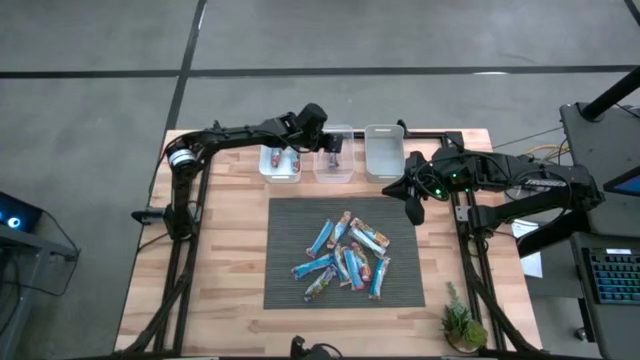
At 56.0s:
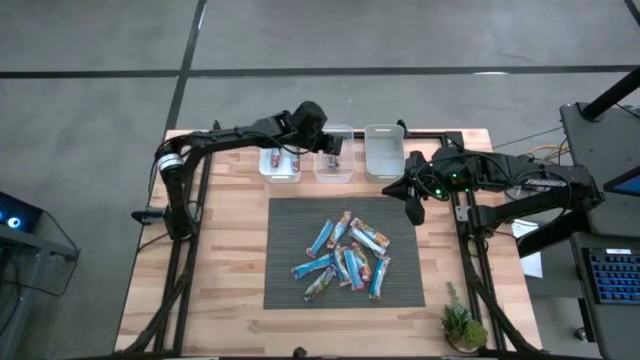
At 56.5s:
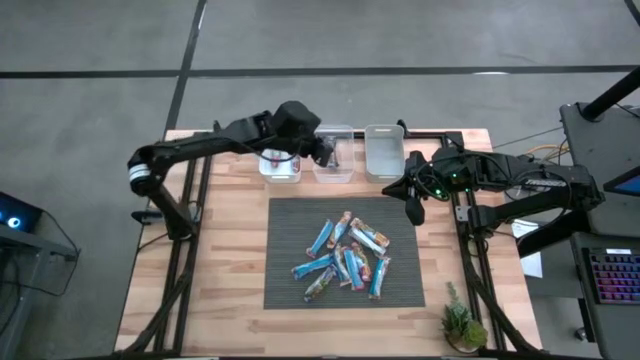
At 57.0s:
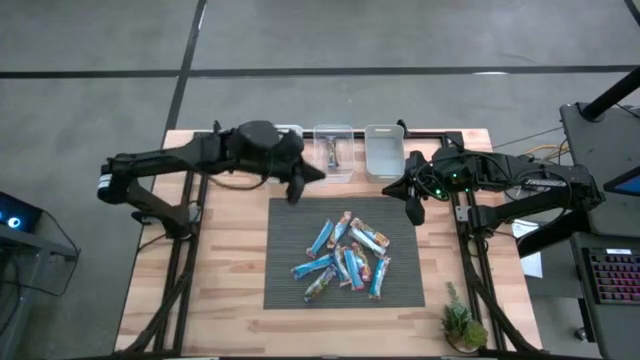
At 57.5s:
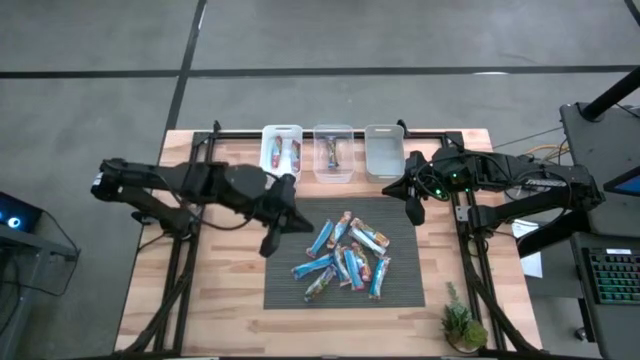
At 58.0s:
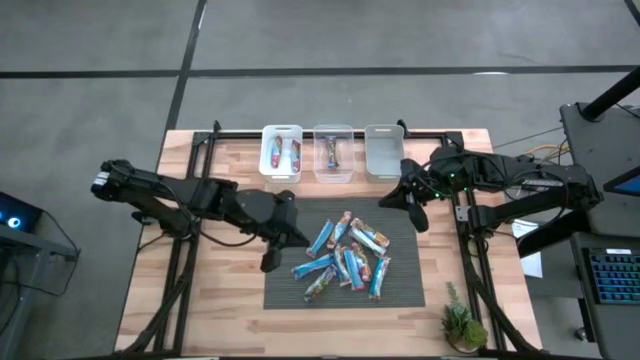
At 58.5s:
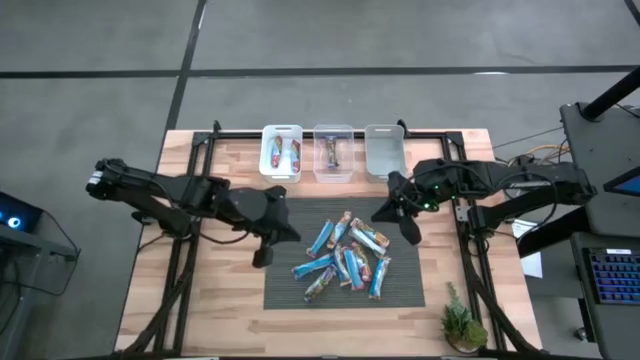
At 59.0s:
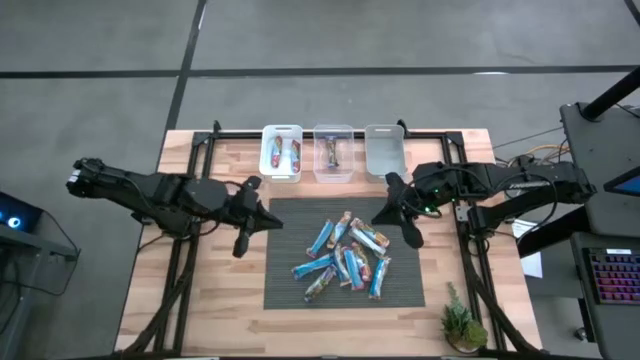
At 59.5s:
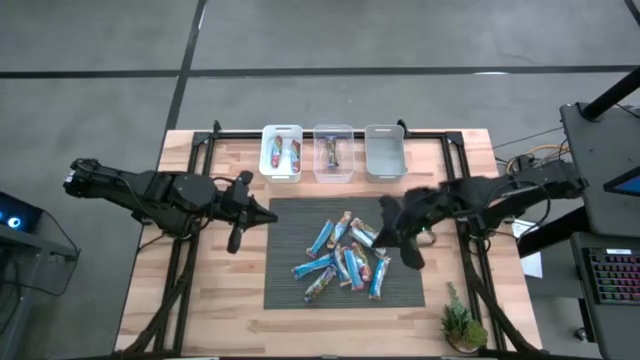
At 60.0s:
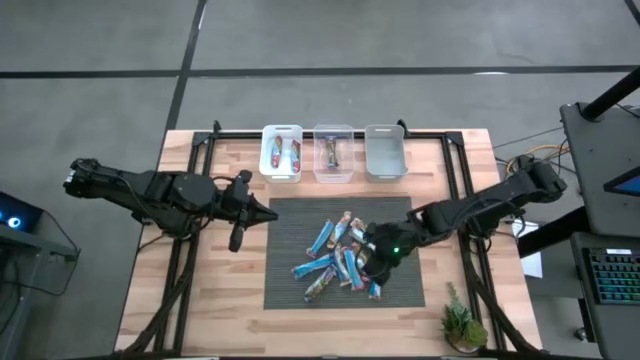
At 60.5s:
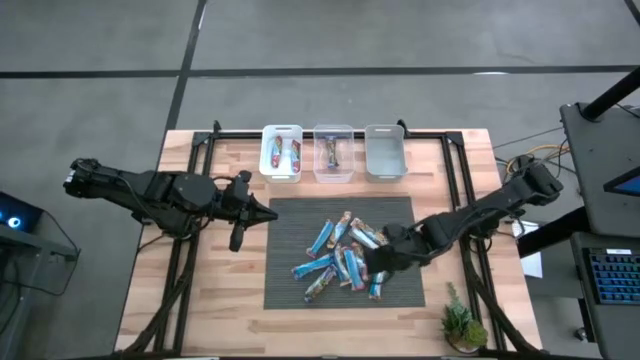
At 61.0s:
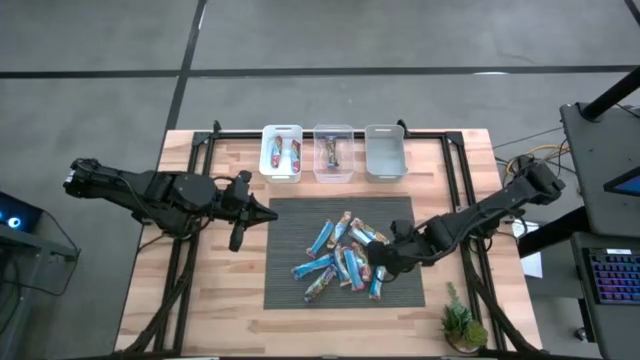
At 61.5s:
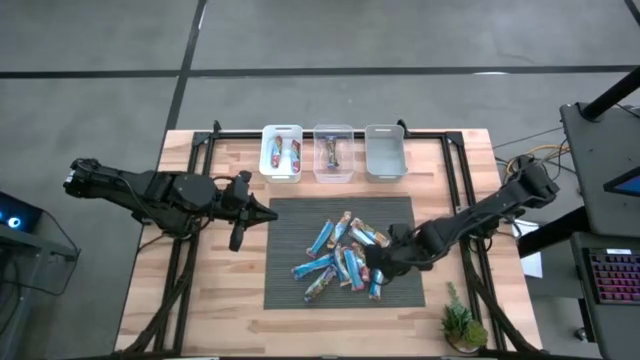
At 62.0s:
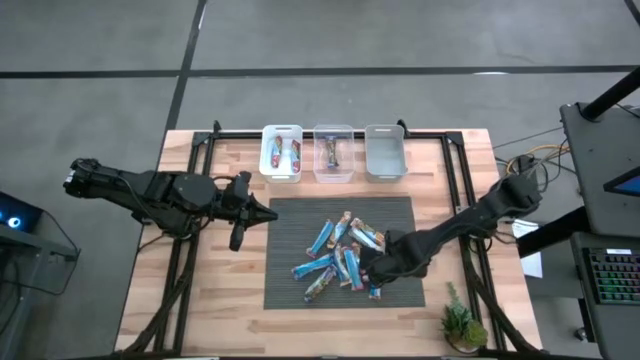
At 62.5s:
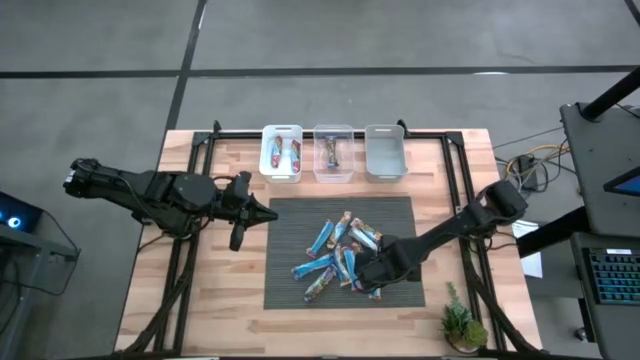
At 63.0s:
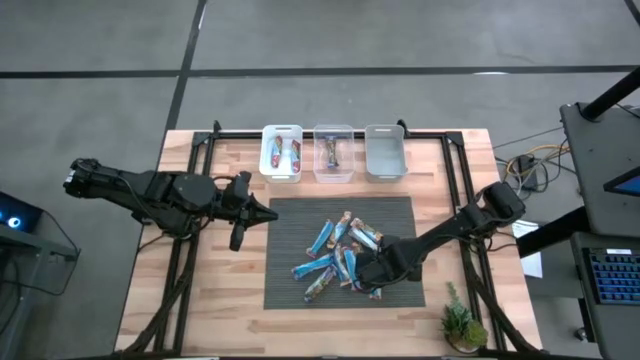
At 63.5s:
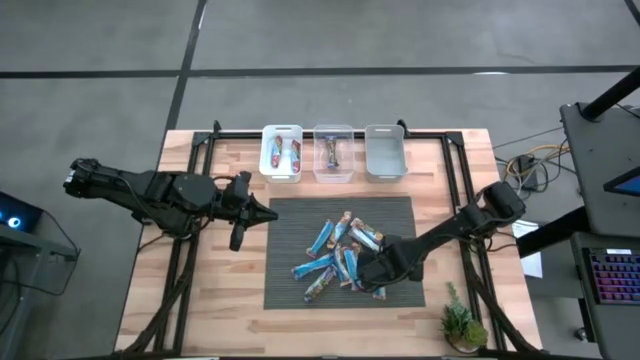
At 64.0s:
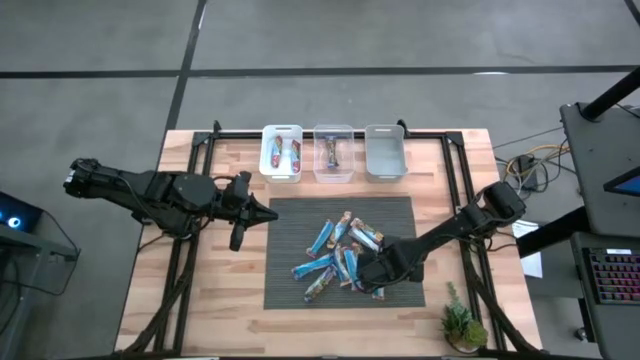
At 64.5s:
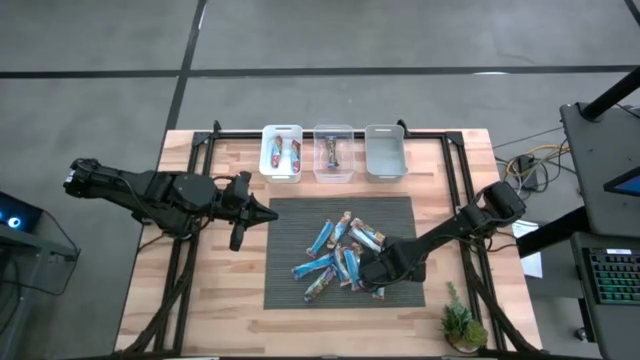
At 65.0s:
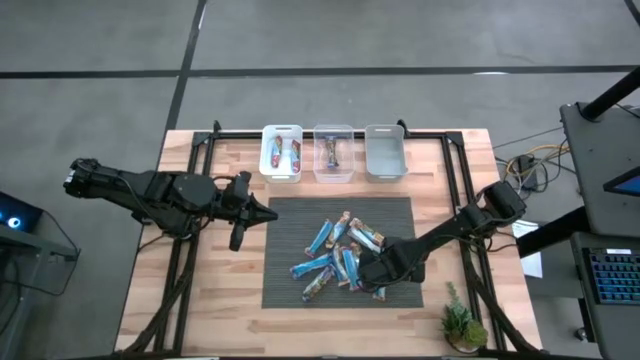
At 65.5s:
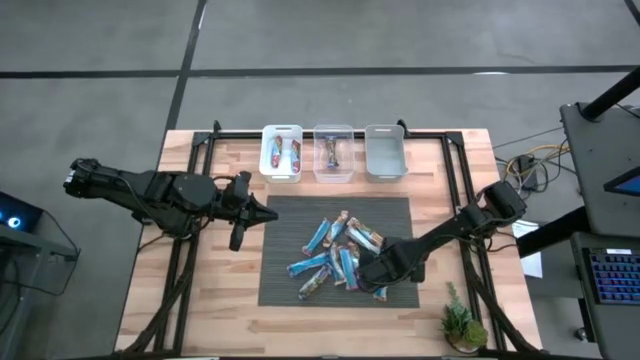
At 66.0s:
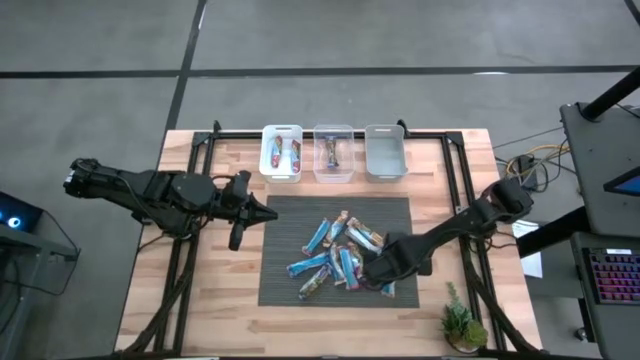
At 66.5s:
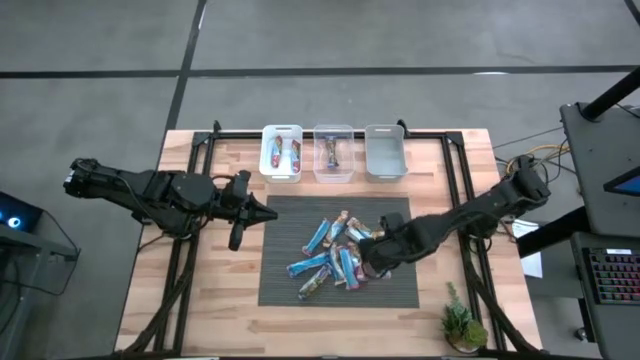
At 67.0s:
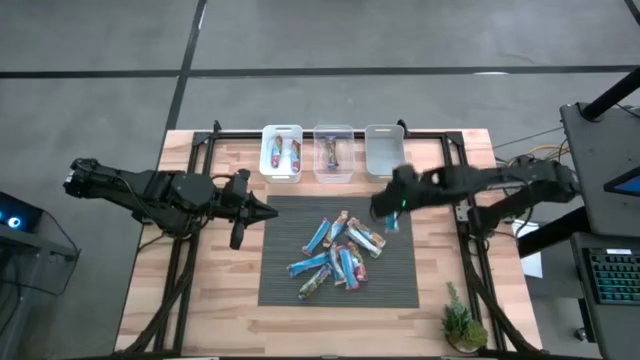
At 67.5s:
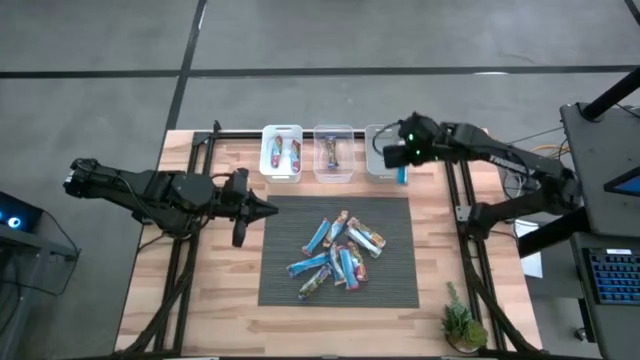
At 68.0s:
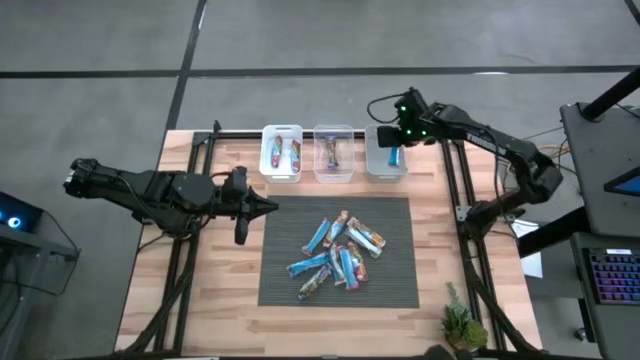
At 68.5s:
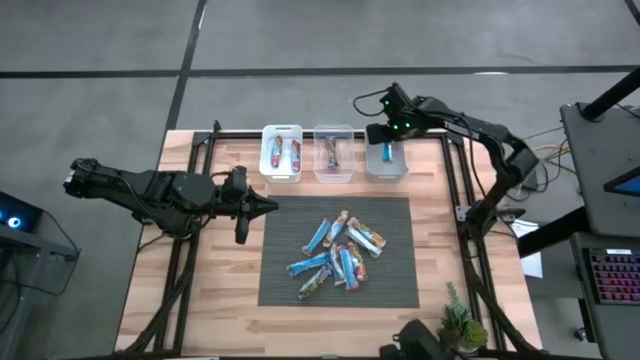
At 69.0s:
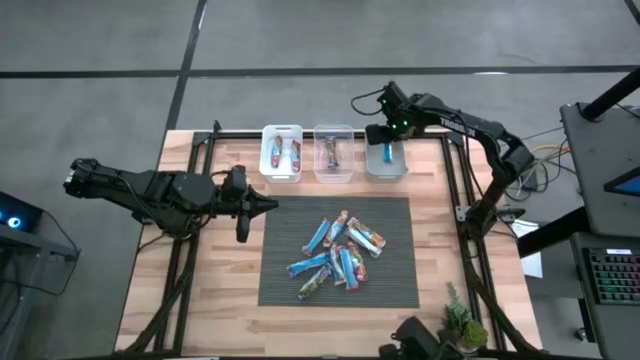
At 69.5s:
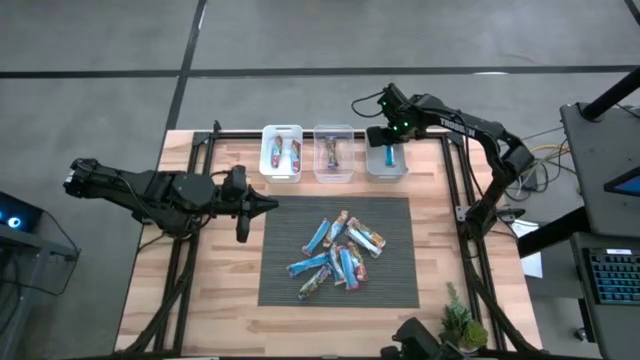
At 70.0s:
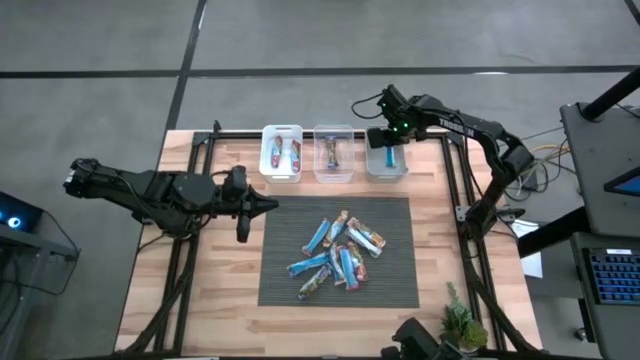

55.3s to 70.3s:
Task: Pick and place Granola Bars by type
Put the yellow granola bar into the gray bin

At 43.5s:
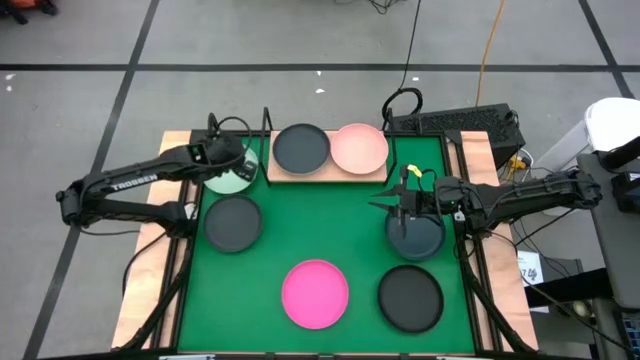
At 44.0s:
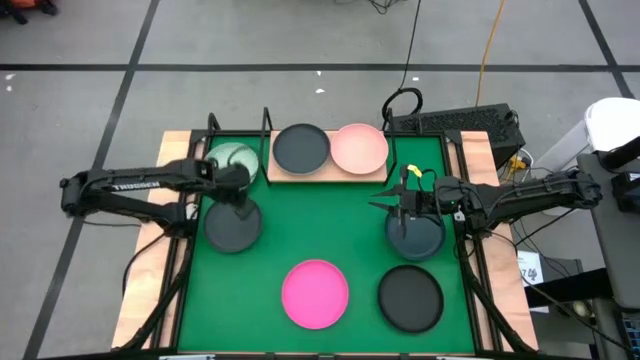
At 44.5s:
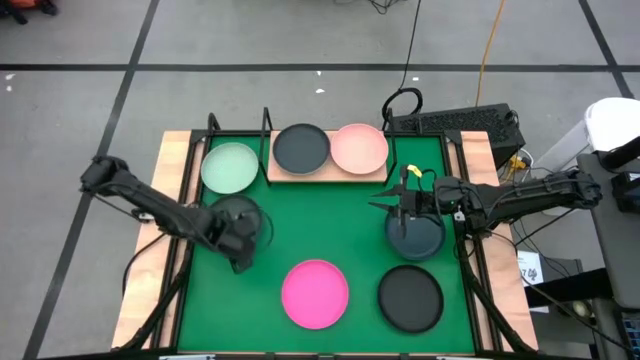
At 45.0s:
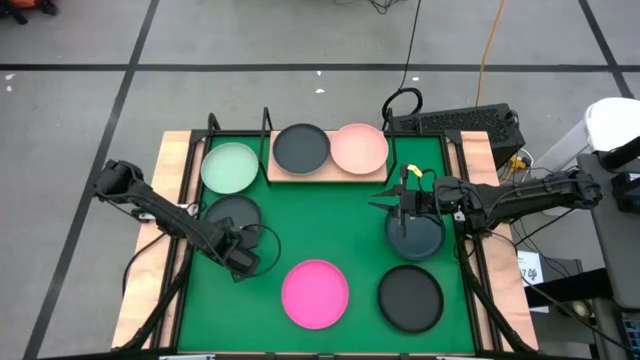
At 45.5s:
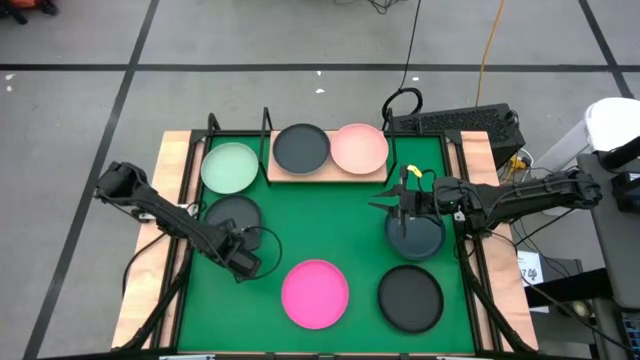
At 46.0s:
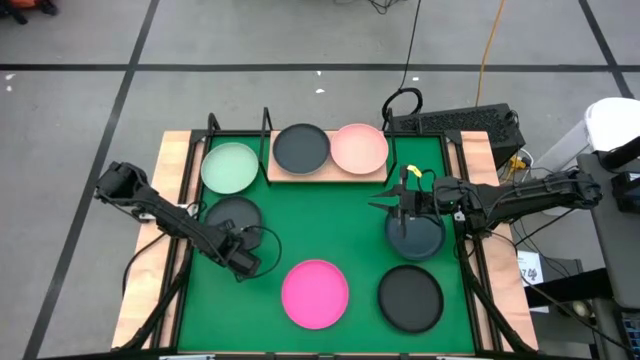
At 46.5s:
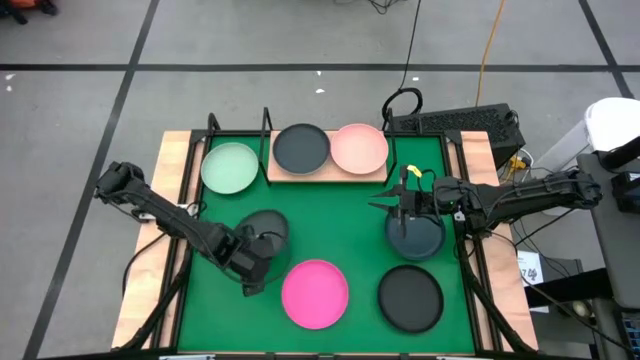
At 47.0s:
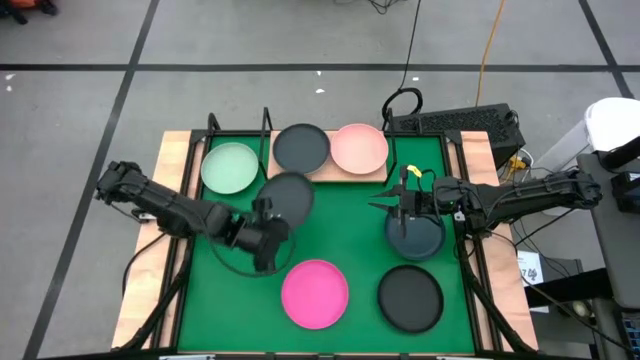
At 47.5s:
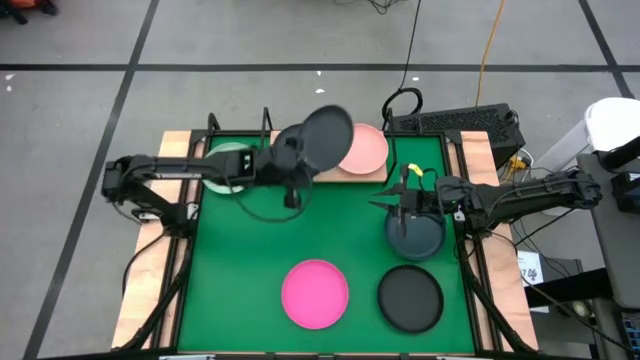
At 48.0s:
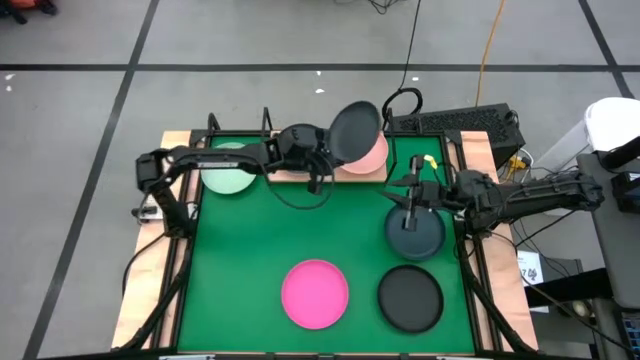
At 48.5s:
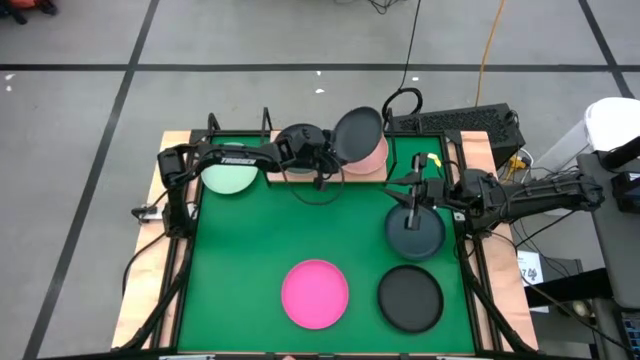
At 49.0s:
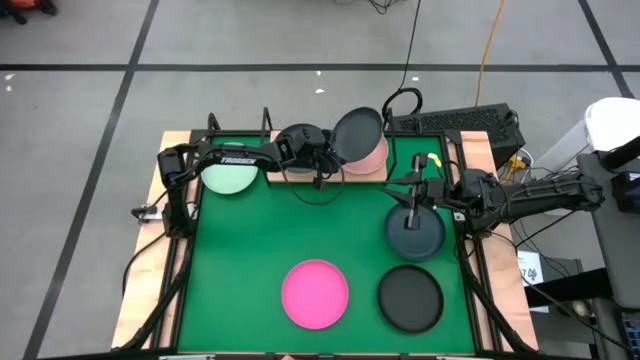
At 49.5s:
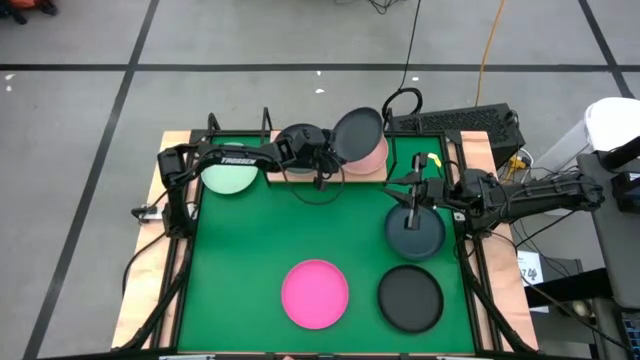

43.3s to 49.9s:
Task: Place and stack plates onto a shelf
Stack the left black plate on top of the light orange plate on the shelf
